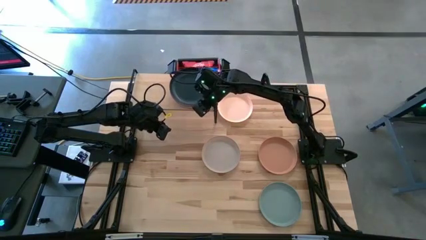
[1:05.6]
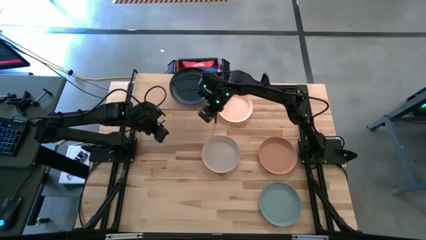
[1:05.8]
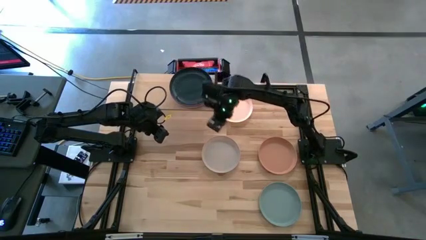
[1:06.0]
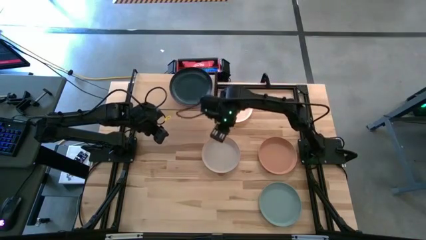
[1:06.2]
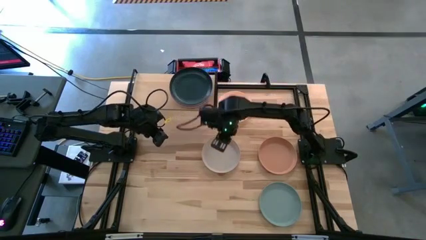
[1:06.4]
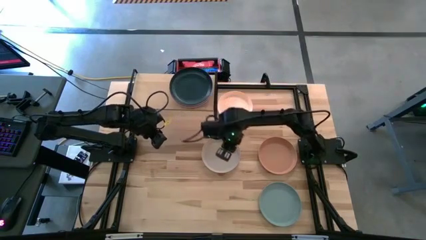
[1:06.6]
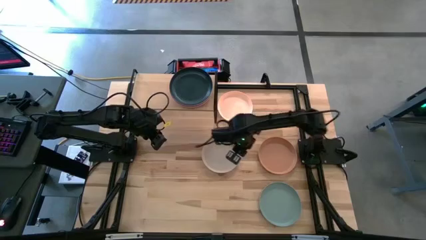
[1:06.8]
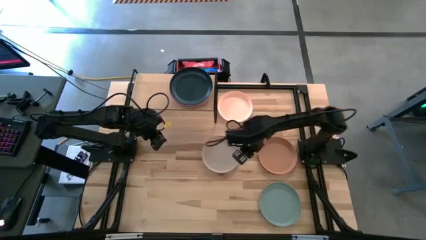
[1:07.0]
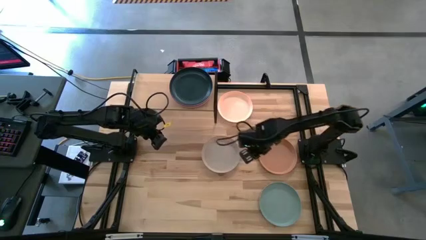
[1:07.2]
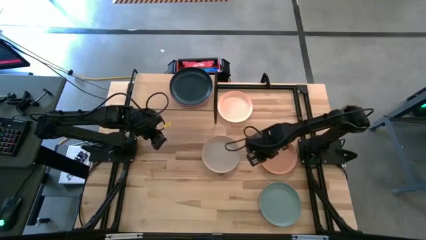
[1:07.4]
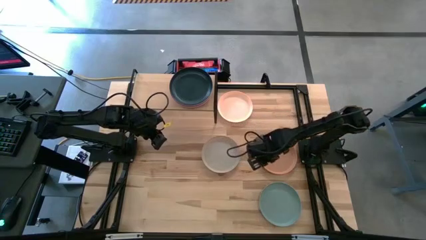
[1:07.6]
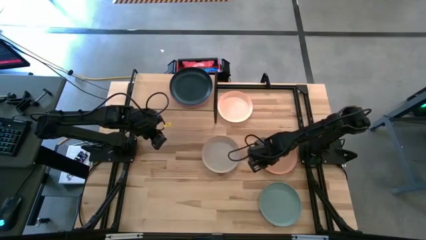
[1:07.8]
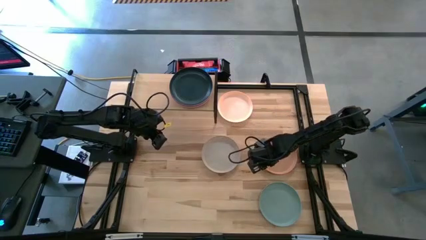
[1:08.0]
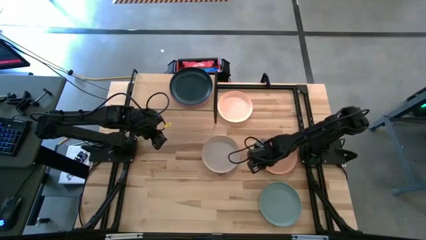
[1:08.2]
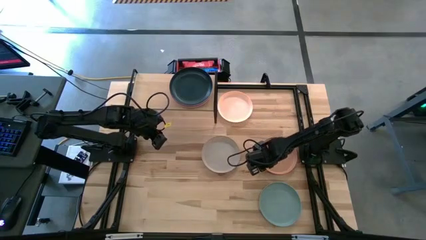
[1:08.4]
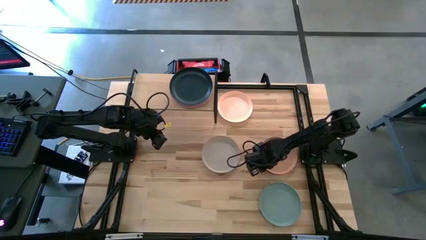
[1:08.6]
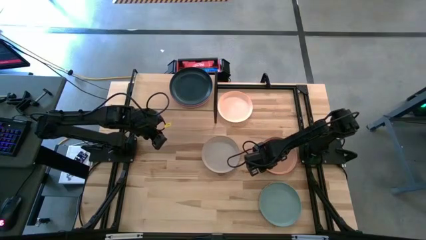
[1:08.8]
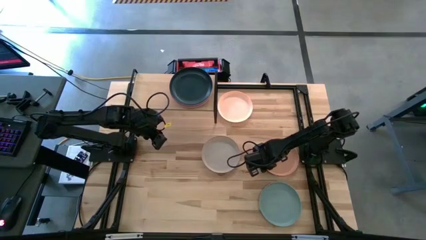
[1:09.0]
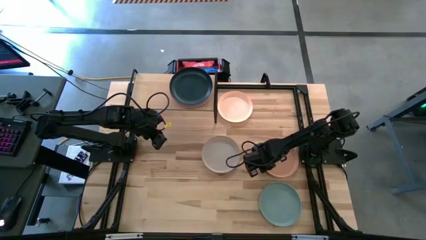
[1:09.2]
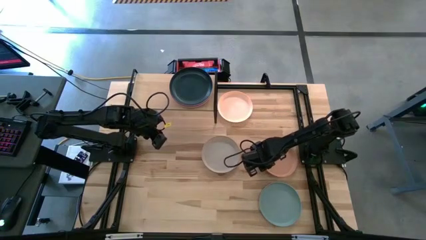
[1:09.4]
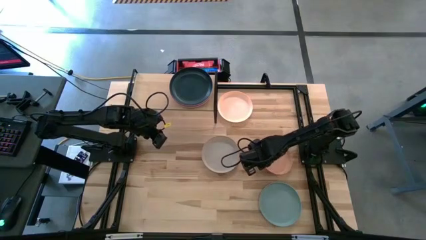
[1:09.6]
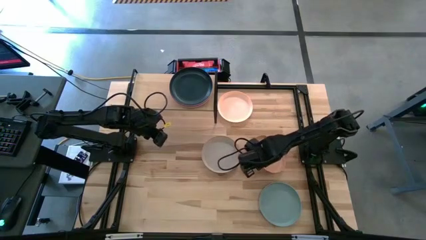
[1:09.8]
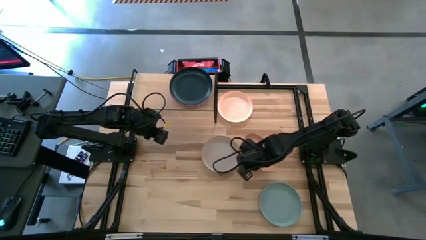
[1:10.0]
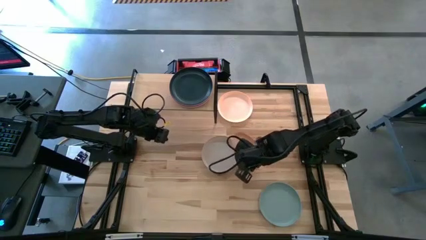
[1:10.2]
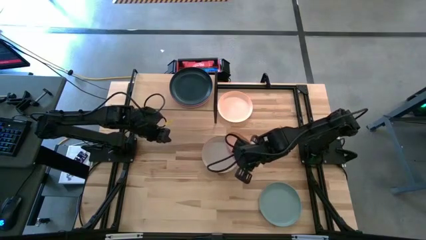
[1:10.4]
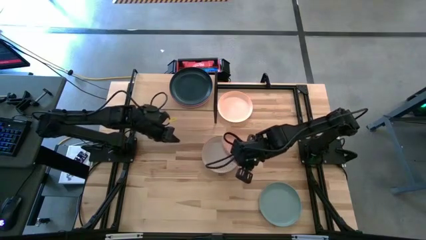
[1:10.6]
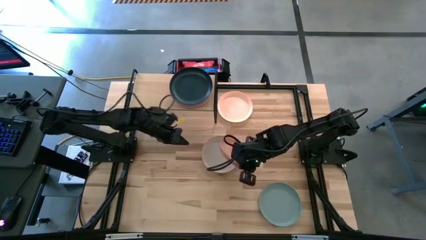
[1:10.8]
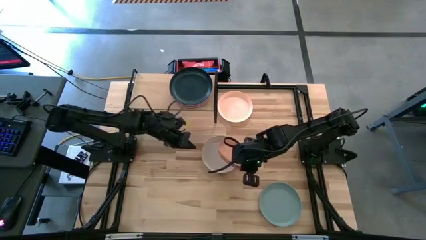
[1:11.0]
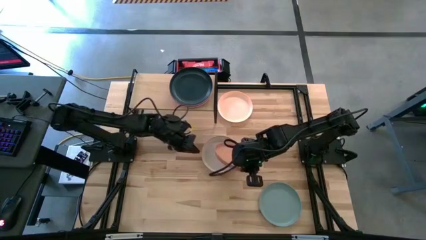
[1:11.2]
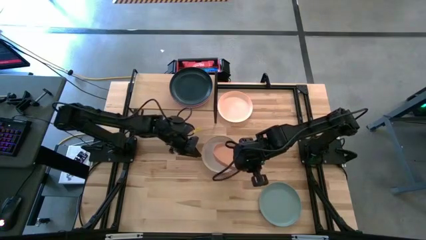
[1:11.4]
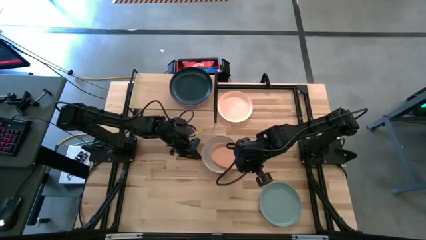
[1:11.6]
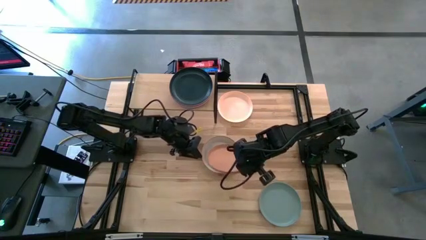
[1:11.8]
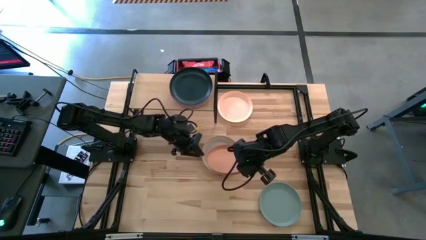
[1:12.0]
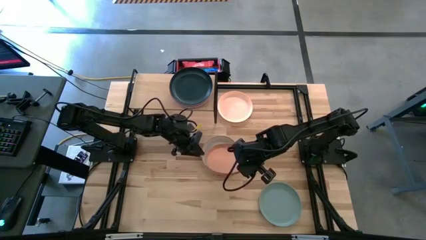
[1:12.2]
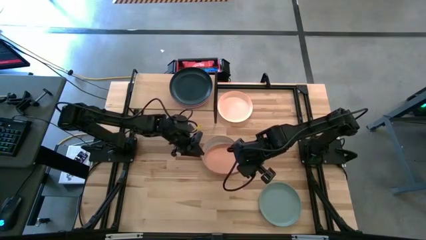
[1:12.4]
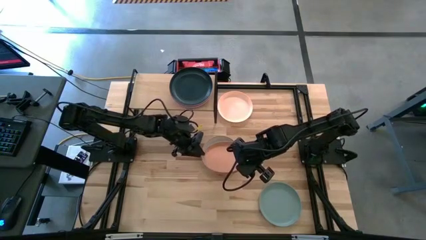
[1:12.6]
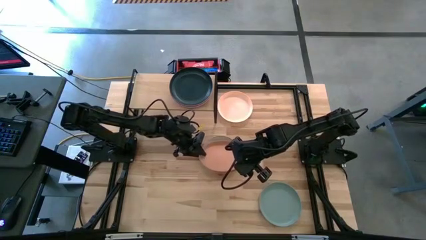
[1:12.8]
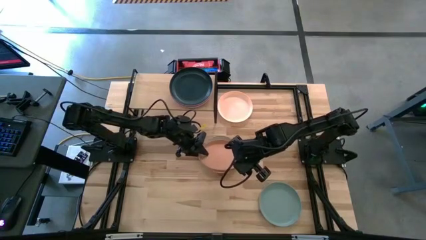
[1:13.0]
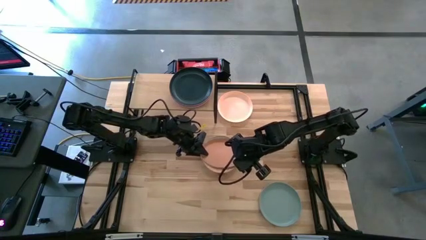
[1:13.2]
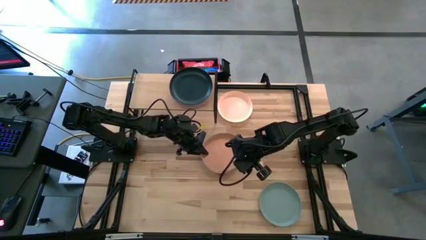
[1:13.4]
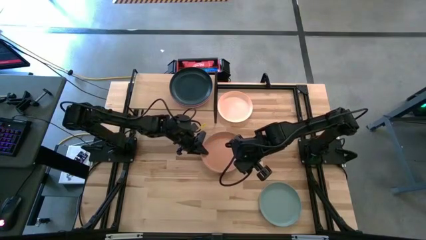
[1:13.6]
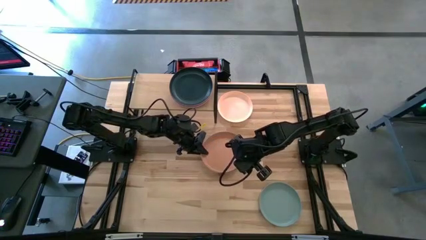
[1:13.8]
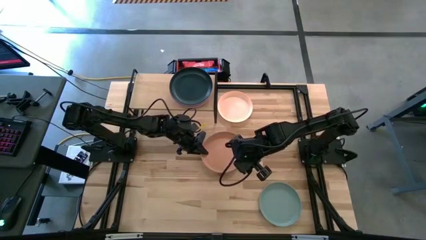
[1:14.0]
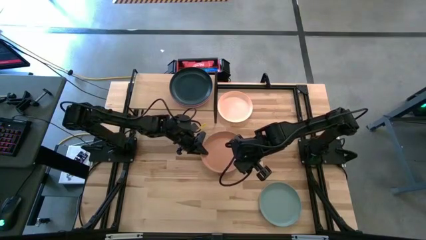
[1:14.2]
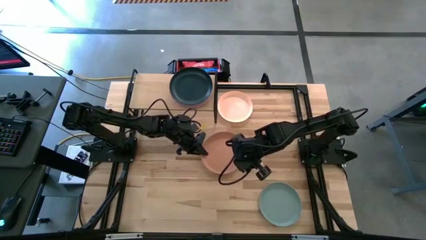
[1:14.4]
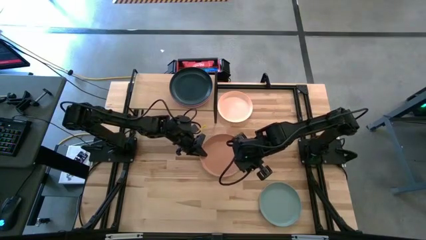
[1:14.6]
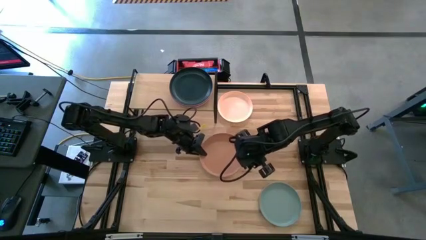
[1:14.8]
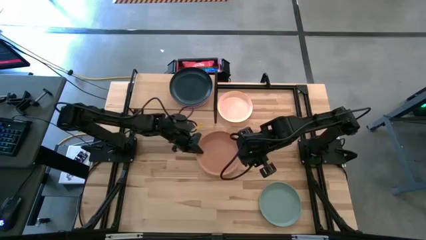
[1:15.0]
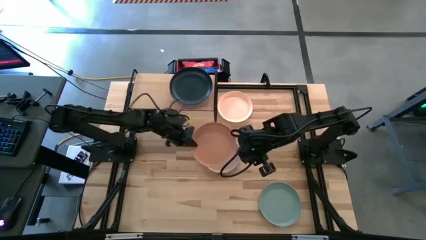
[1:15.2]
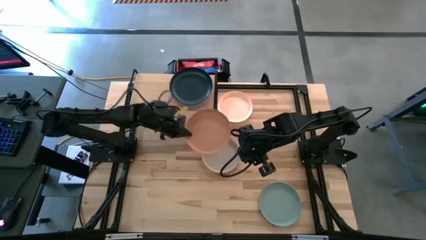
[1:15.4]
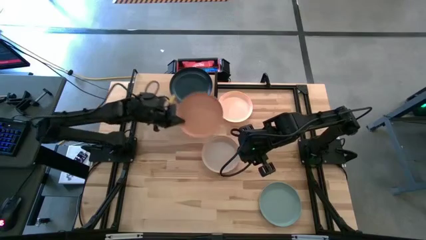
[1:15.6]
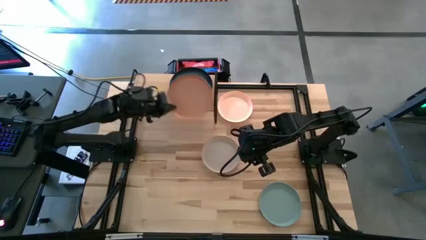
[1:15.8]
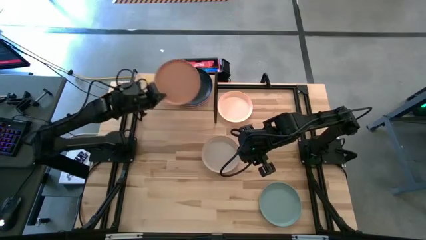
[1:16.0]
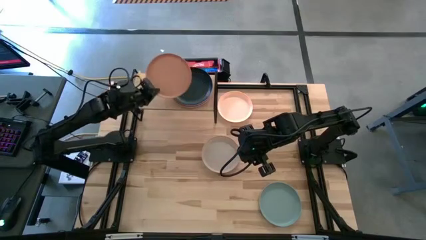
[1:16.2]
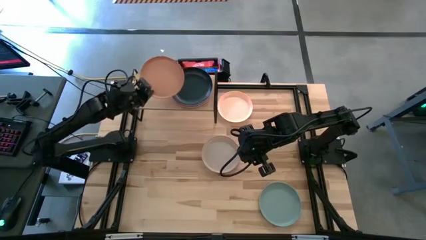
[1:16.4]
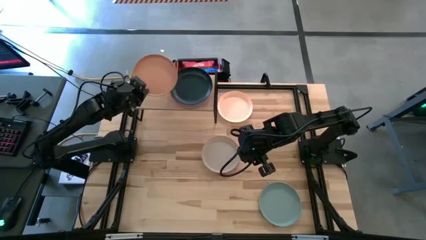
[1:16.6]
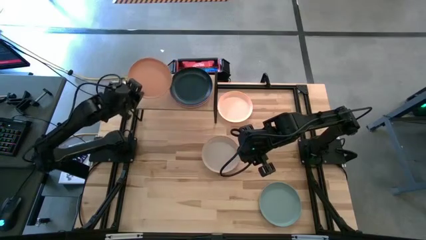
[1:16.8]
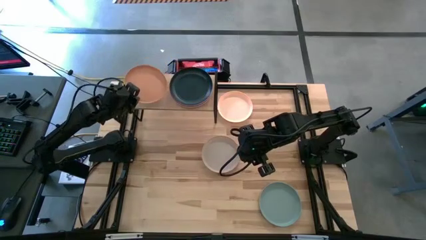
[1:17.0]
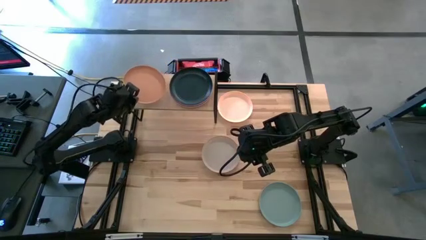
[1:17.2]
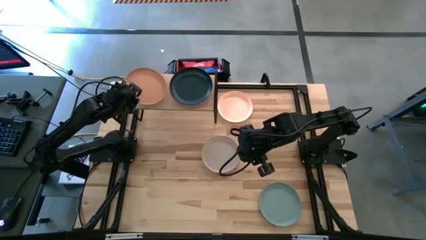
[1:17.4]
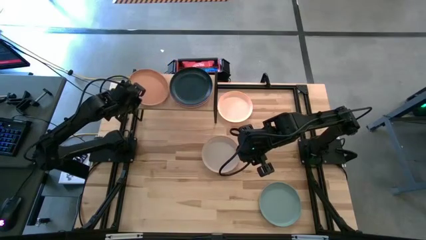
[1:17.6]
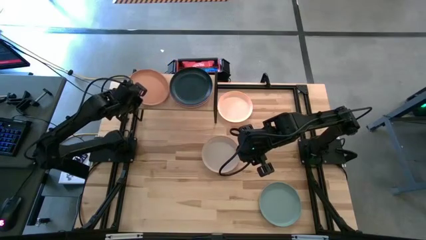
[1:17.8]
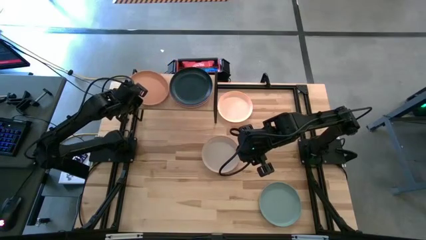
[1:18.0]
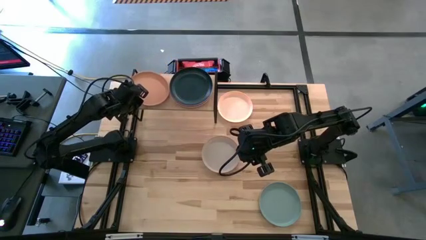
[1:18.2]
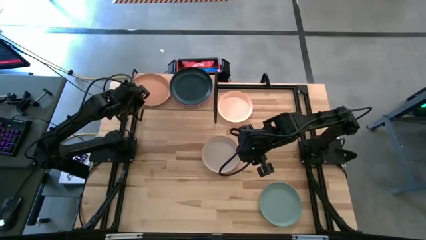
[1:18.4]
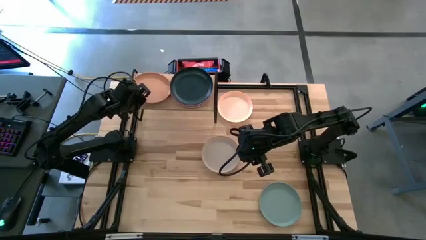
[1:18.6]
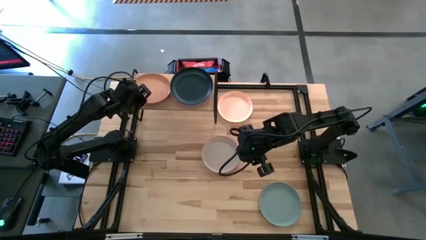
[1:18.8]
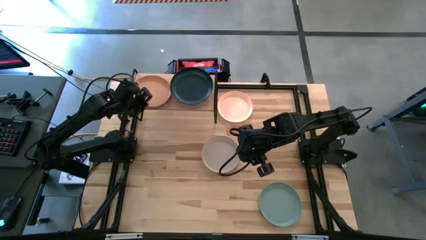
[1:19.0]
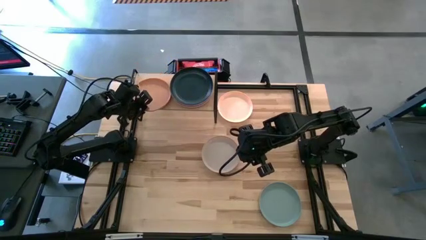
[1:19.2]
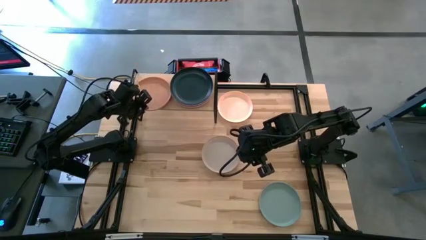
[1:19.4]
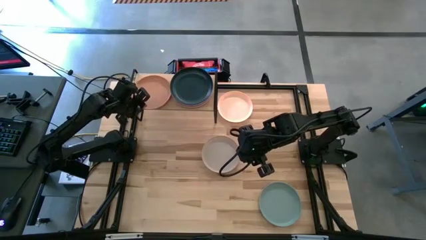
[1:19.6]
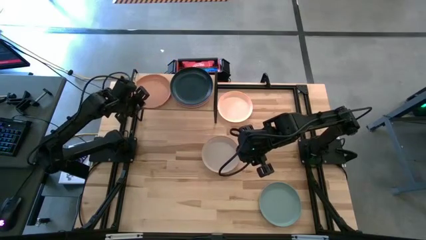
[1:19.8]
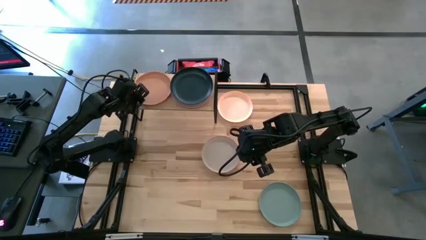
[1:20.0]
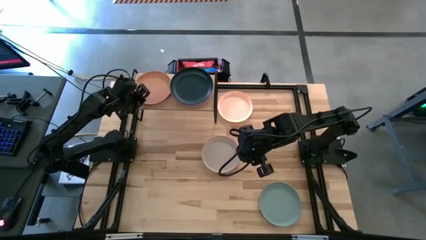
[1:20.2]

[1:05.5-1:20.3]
Task: Place and stack plates onto a shelf
Put the orange plate on the shelf

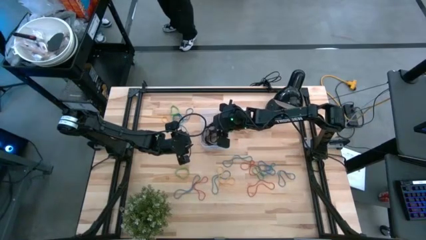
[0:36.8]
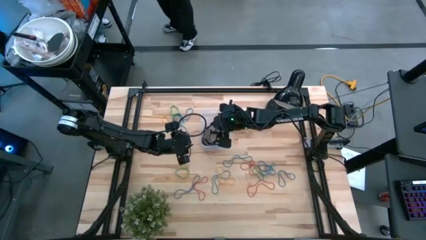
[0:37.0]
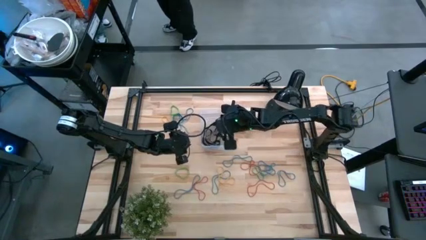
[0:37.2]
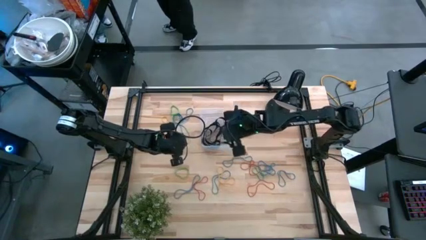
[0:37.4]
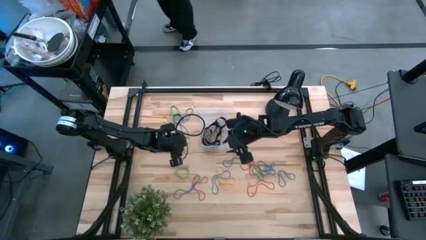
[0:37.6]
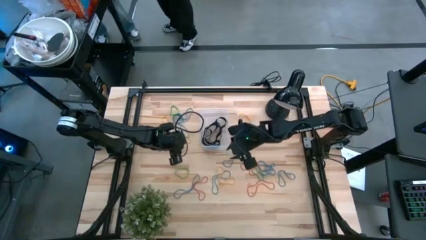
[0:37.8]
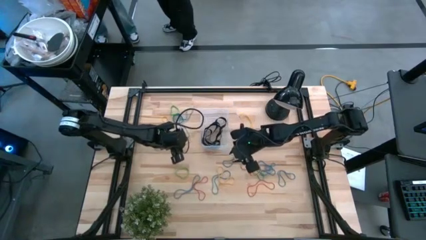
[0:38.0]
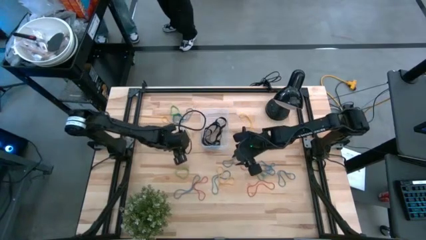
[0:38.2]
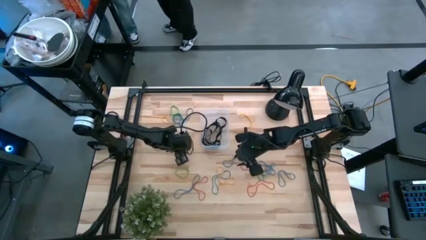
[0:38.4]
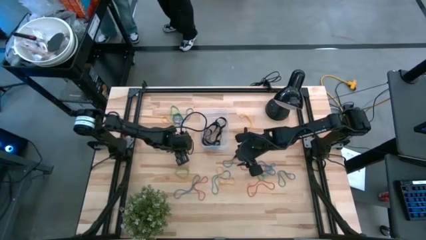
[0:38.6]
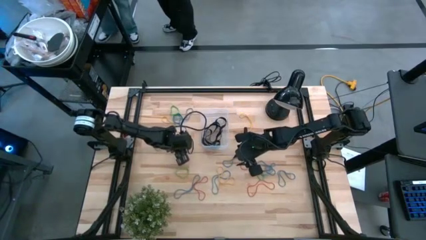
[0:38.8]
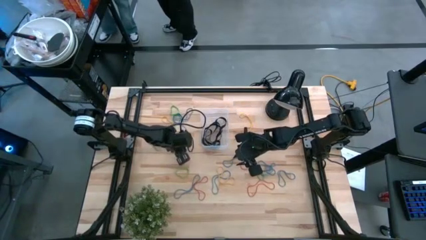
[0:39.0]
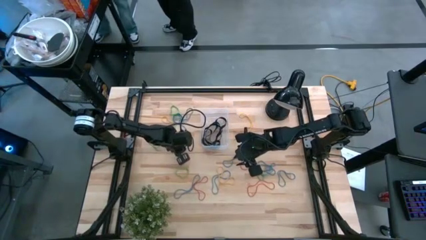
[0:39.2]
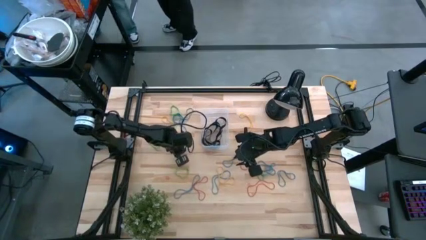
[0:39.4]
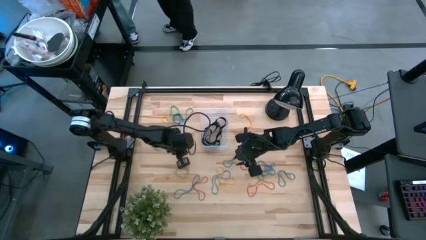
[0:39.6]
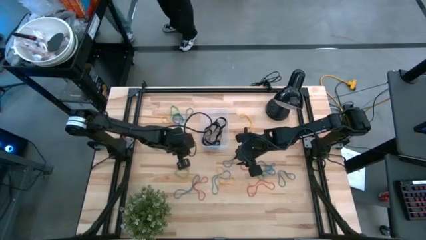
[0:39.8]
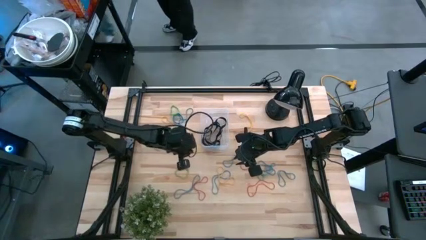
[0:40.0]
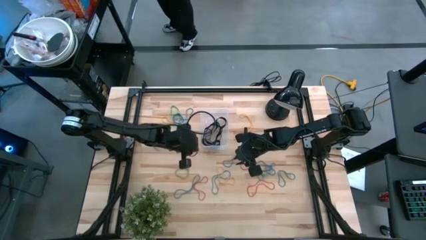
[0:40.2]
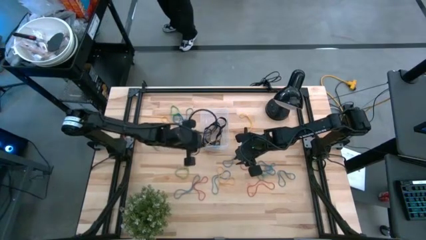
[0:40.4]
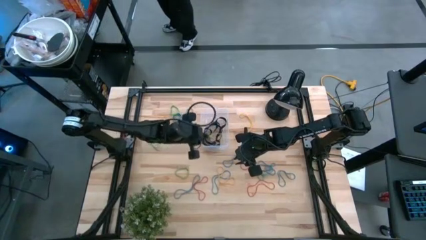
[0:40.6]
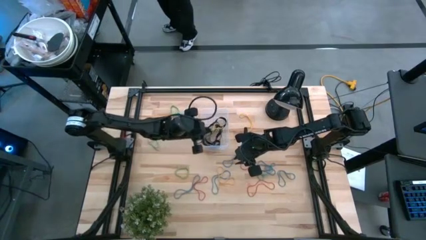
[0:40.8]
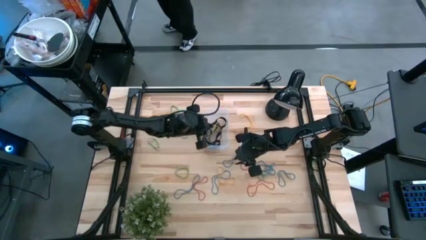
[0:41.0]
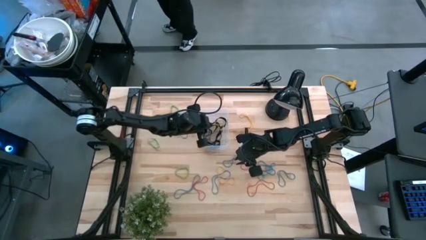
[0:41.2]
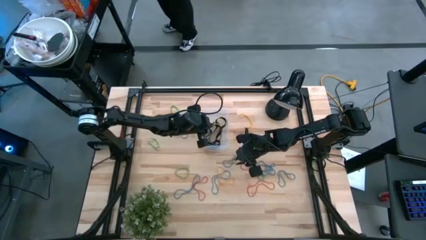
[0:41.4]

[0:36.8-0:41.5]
Task: Pick and place rubber bands into bin
Put the yellow rubber band into the transparent bin
